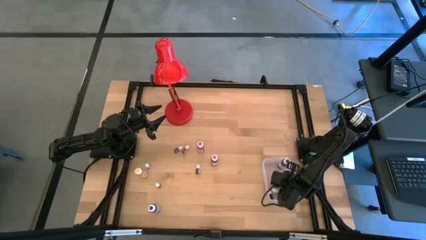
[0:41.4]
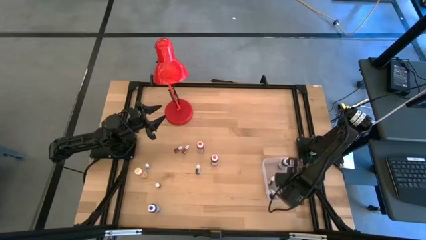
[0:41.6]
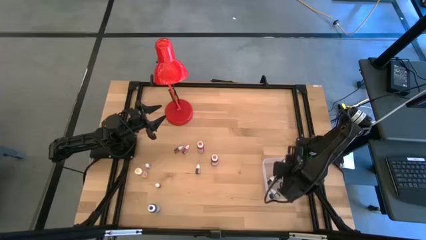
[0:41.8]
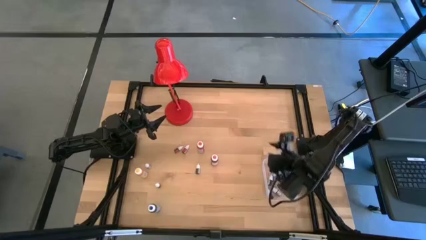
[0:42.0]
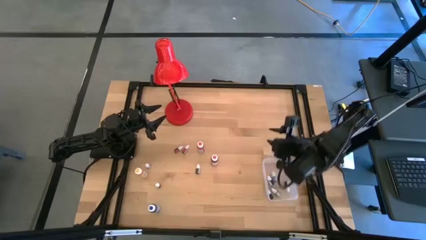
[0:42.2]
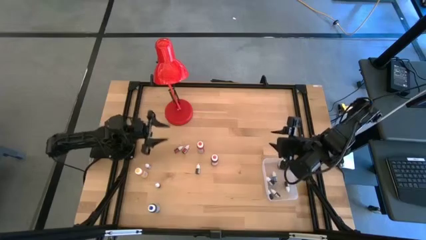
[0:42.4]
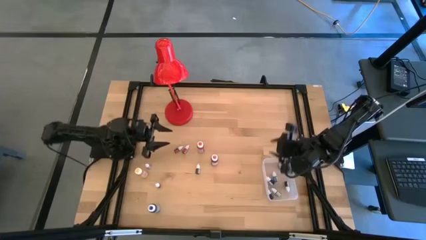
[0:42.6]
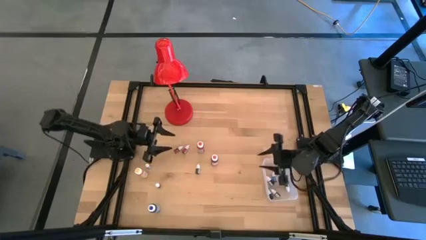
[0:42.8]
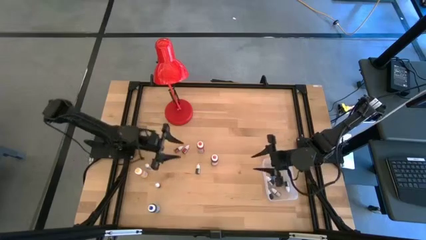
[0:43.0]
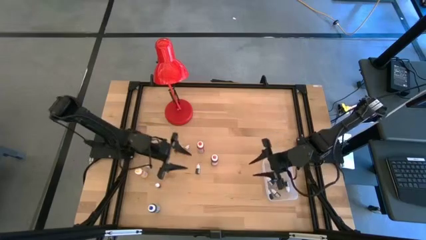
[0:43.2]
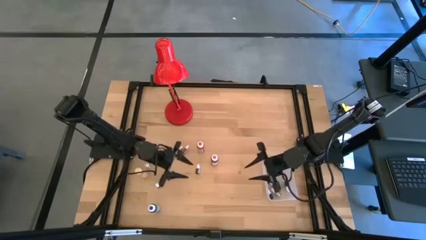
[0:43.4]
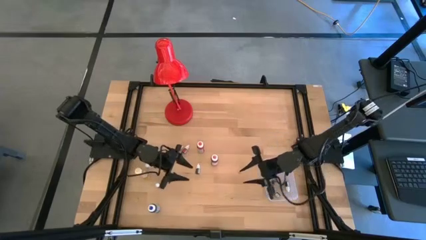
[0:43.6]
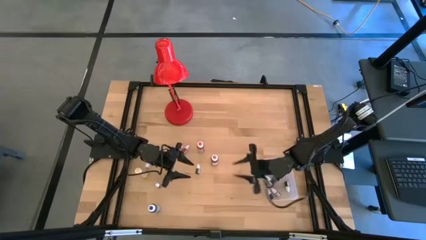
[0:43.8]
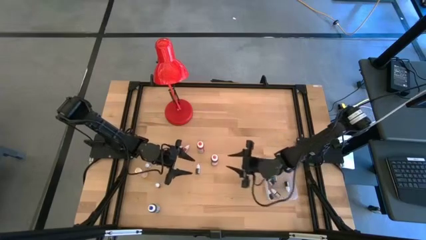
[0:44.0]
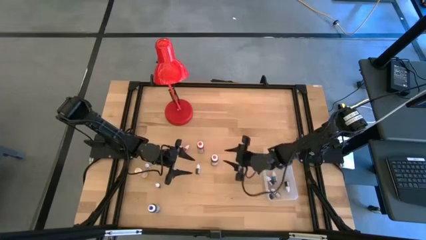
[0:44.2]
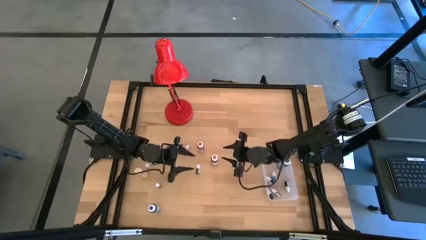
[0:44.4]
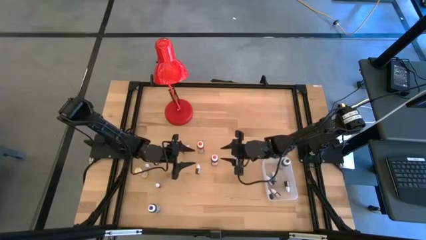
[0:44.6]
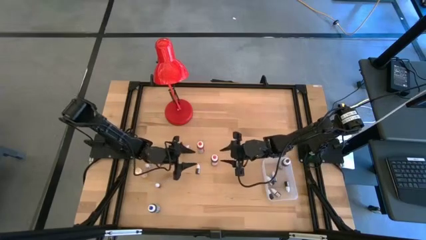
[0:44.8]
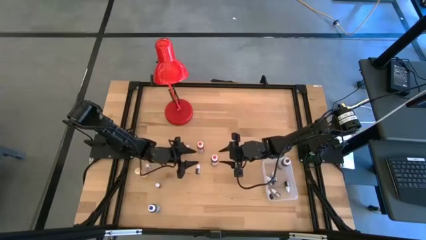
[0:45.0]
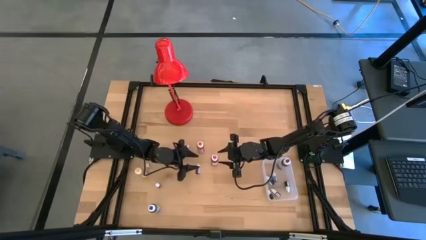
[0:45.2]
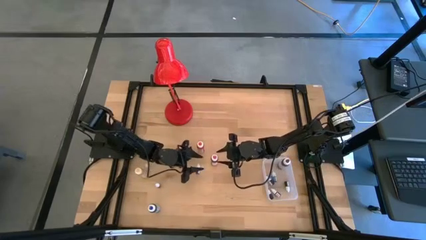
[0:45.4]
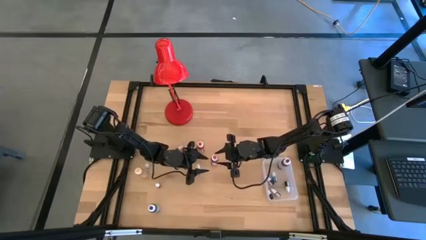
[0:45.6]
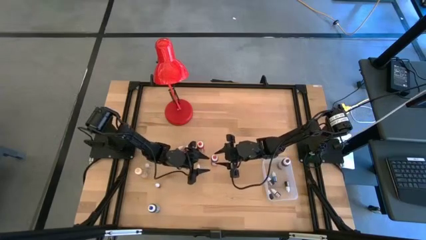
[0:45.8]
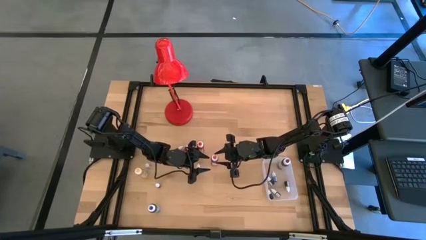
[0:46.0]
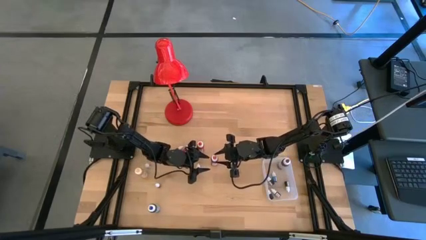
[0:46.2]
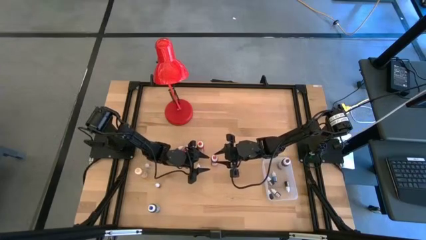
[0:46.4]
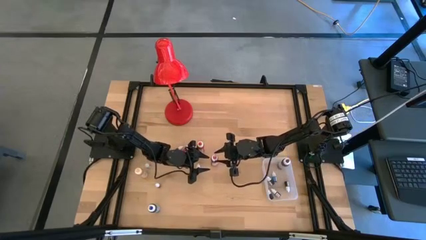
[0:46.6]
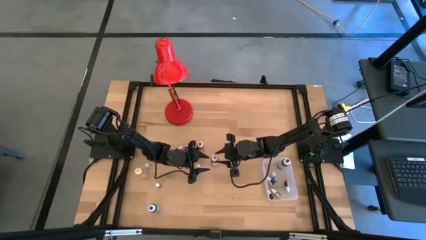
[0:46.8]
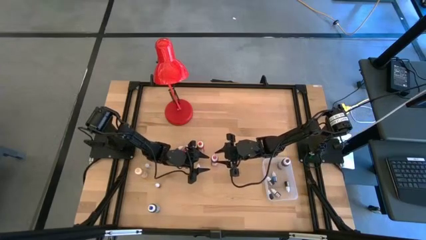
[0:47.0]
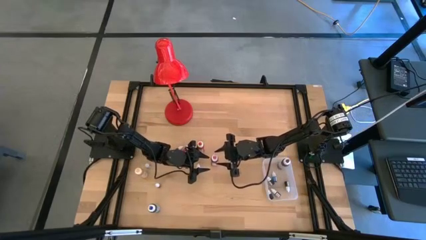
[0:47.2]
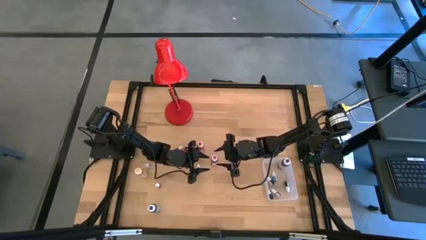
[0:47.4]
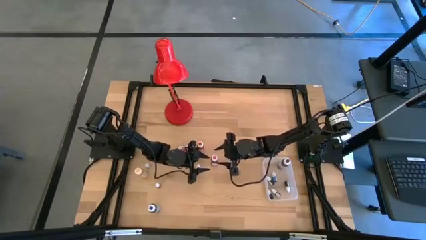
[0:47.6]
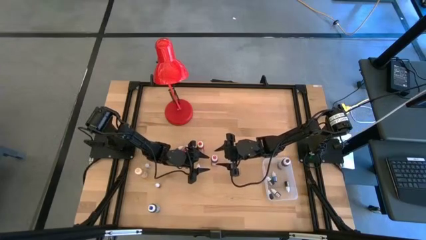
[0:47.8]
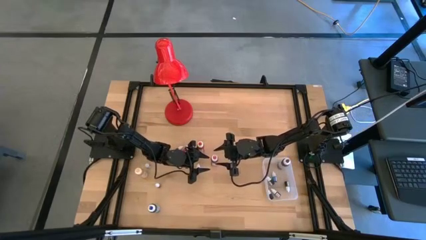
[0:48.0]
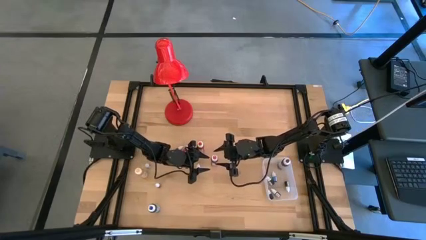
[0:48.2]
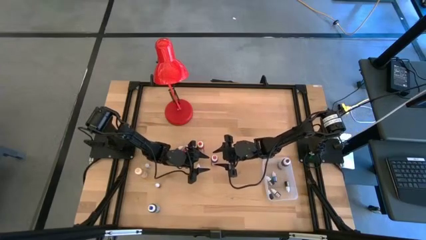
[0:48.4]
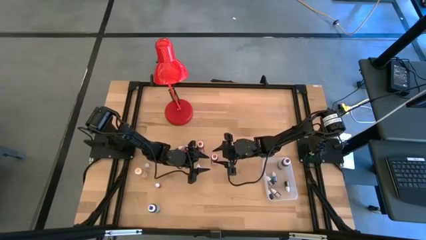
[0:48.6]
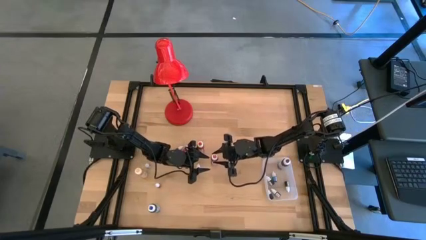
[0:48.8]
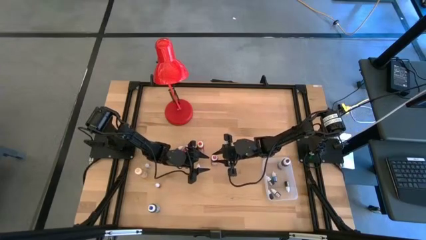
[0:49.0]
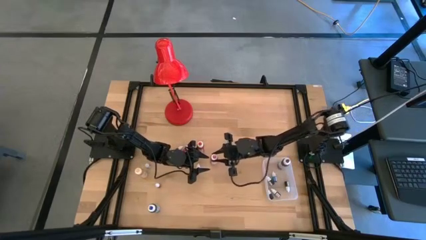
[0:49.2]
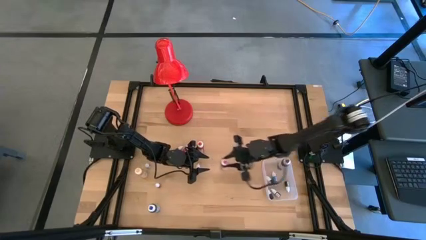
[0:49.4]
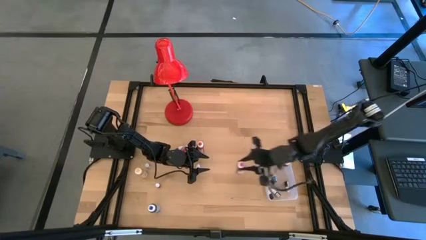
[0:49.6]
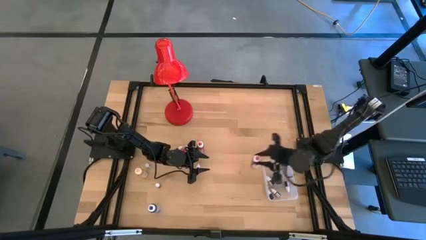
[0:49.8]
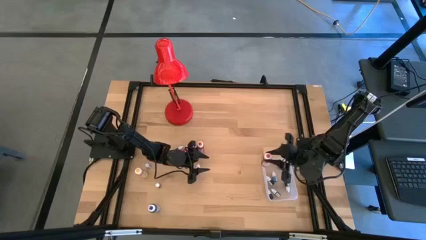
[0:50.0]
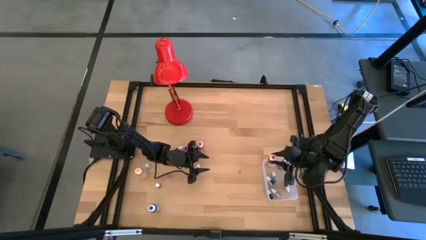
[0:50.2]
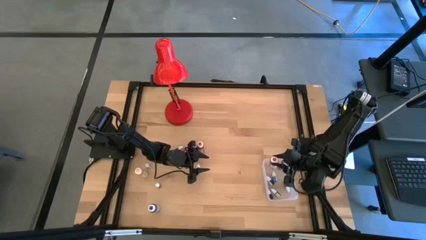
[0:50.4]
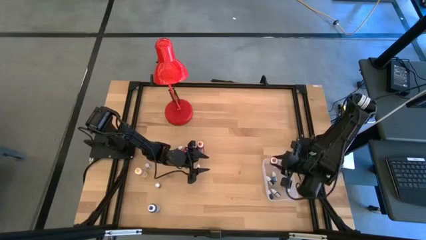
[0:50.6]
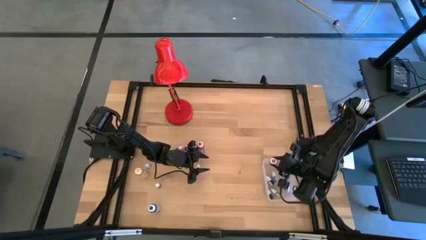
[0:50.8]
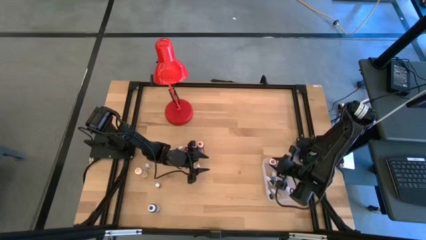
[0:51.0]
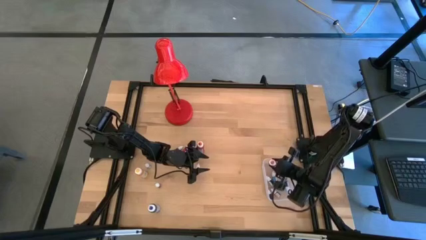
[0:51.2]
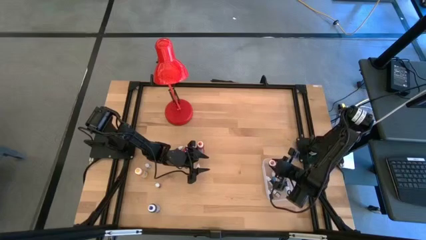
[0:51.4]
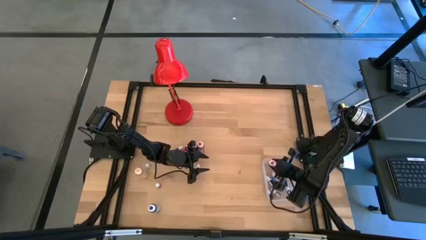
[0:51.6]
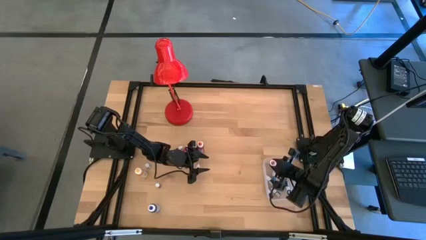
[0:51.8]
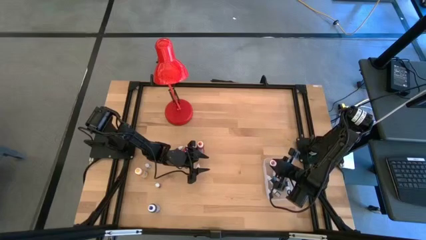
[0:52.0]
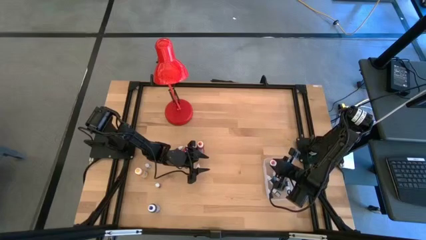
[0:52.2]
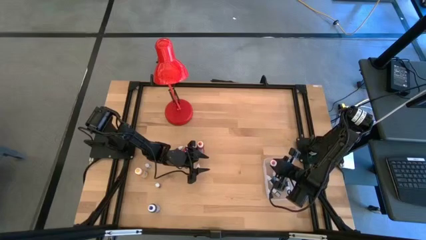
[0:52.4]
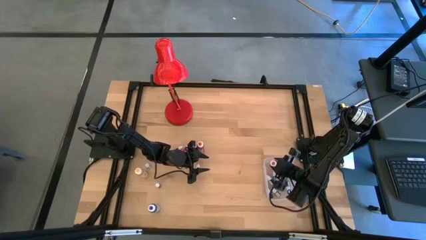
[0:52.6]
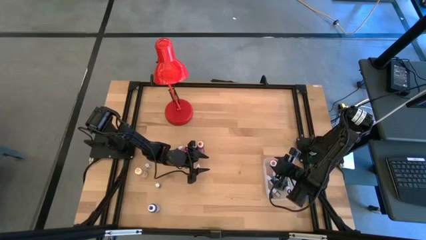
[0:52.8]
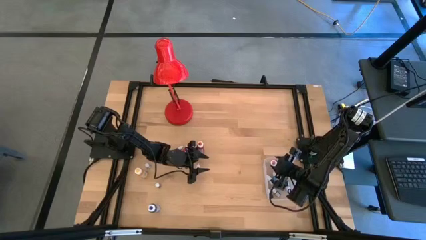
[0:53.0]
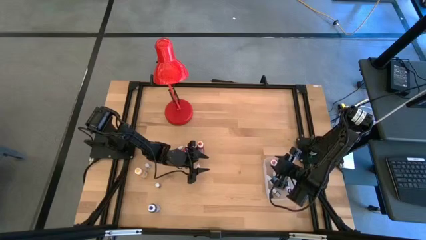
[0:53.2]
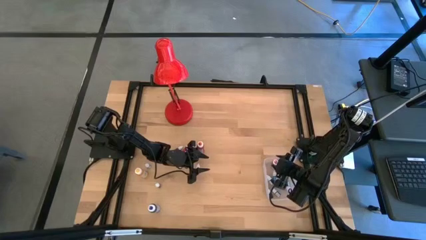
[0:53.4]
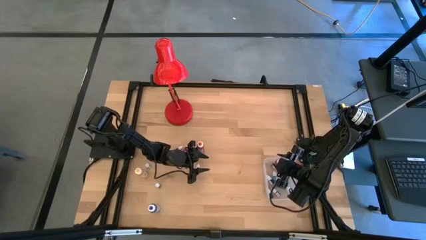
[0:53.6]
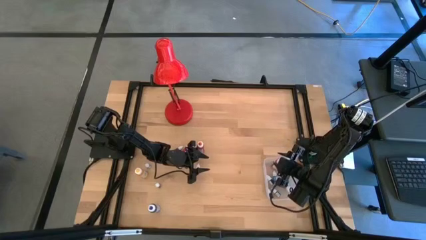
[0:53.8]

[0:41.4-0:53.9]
Task: Pick & Place food coloring
Put the big pink bottle into the transparent container

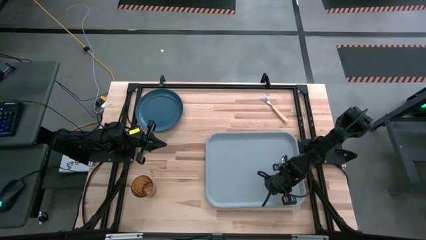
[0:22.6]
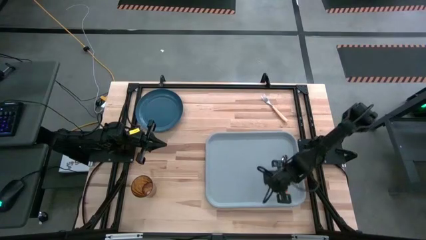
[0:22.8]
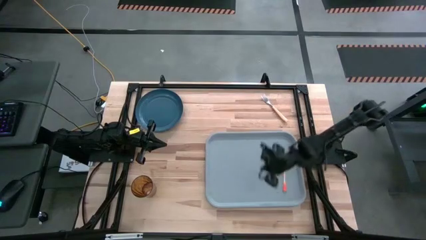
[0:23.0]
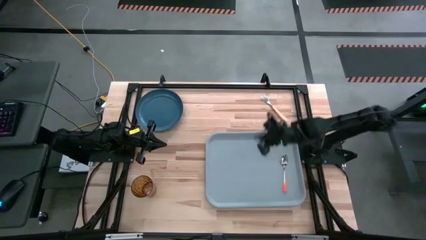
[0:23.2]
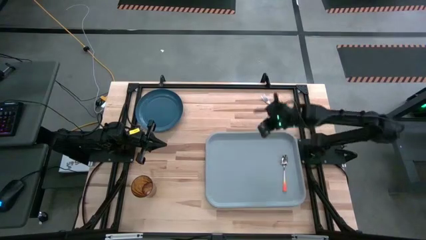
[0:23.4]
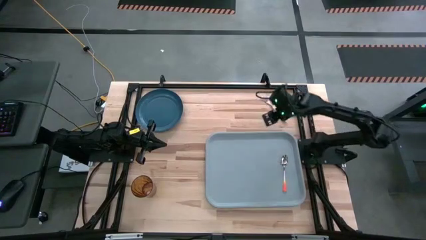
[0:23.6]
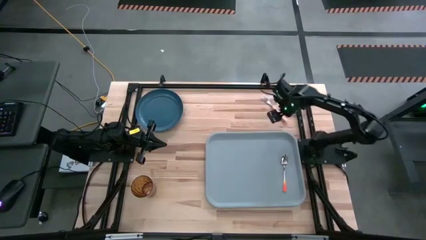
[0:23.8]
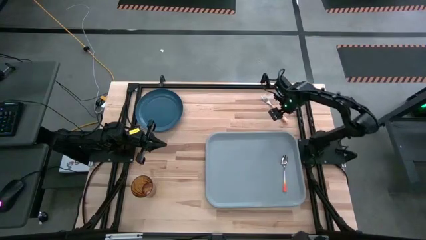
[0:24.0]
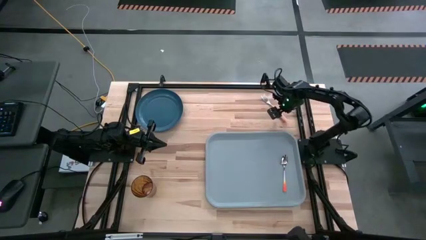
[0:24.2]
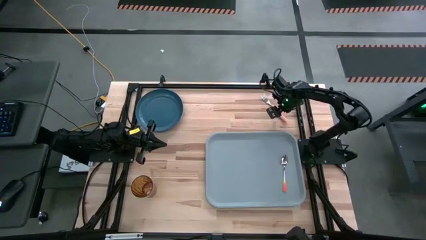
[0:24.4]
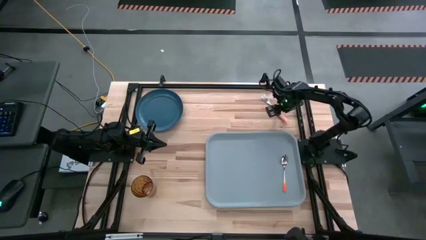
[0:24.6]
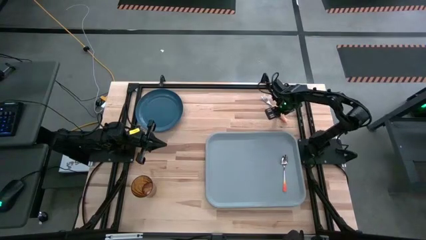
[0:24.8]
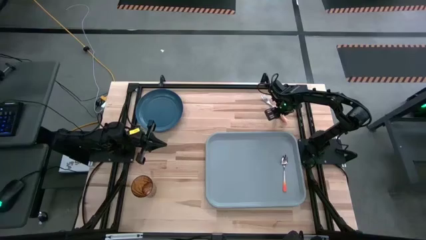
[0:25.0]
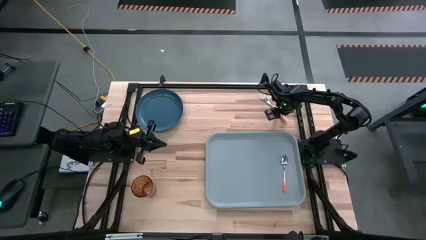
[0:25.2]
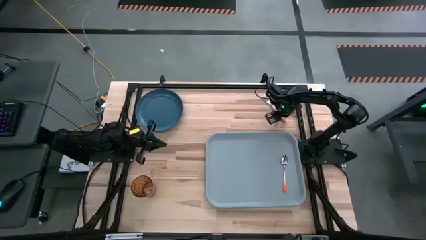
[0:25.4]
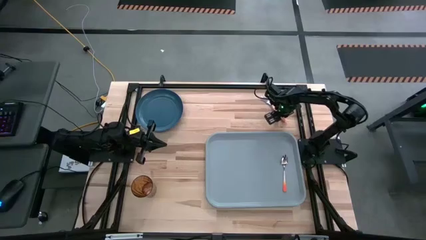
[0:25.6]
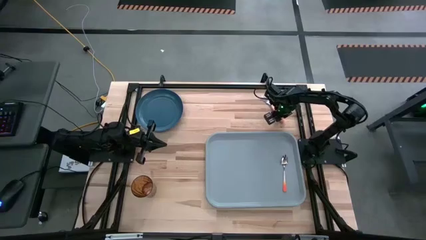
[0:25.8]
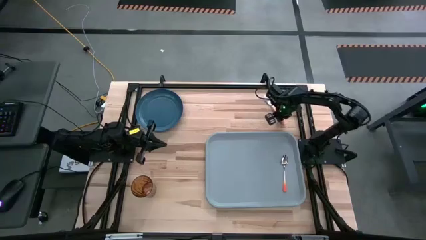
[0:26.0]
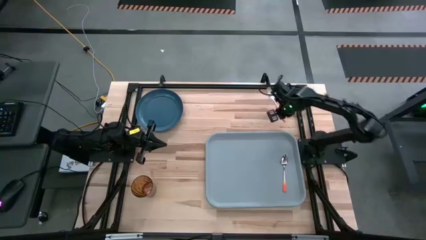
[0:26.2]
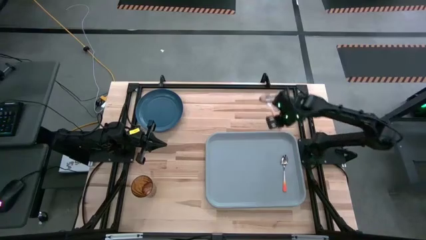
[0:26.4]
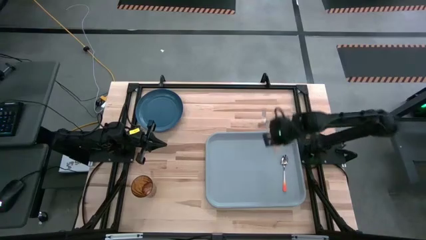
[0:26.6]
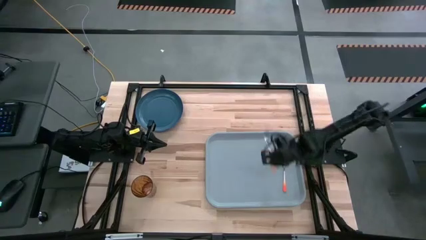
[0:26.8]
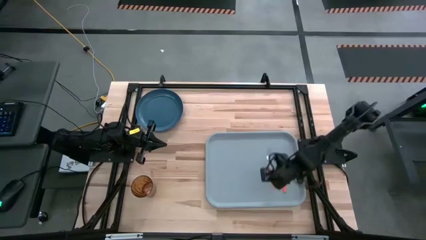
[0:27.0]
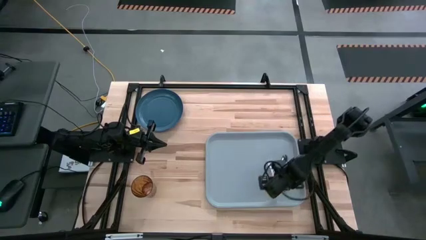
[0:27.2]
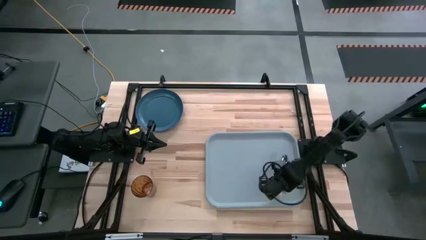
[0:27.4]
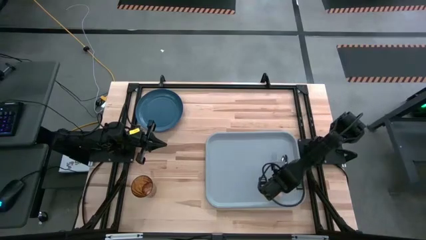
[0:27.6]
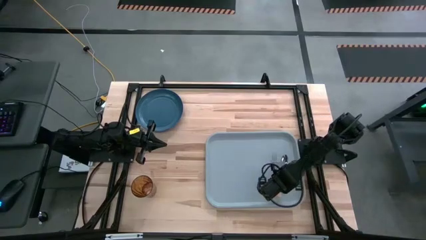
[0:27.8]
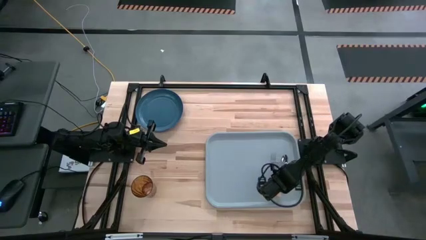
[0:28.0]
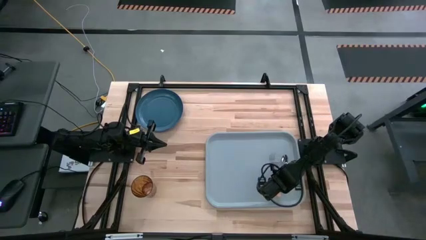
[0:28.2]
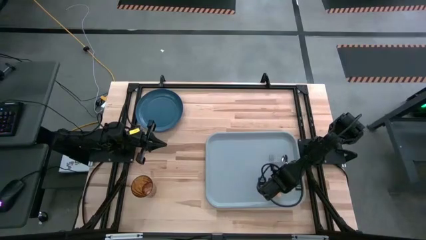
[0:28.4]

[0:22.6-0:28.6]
Task: Pick and place plate/cup/fork/spoon on tray
Put the light orange fork to the left of the orange spoon on the gray tray
